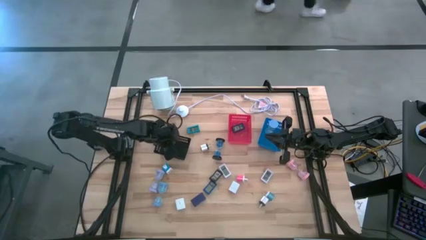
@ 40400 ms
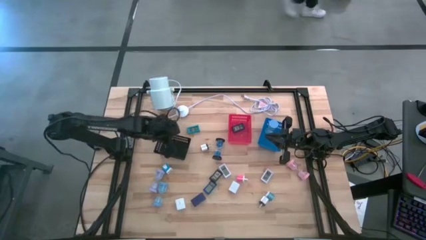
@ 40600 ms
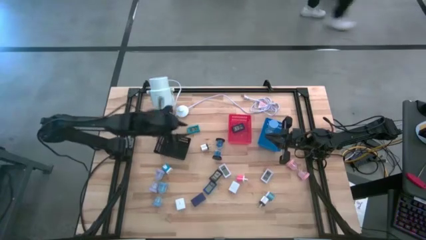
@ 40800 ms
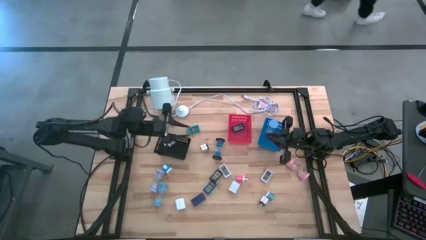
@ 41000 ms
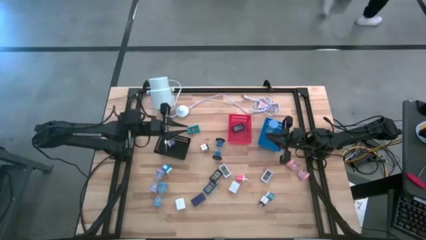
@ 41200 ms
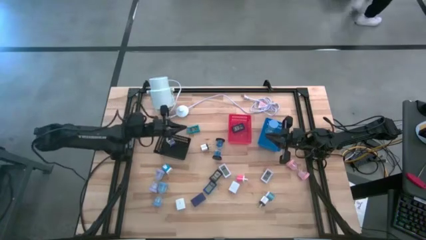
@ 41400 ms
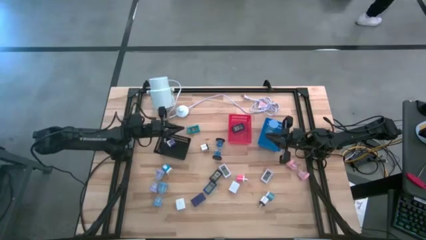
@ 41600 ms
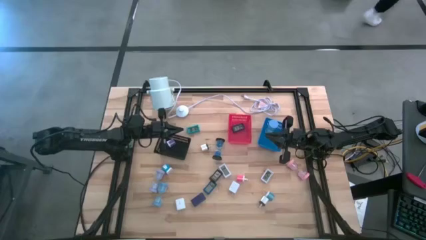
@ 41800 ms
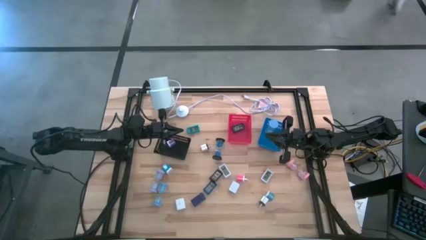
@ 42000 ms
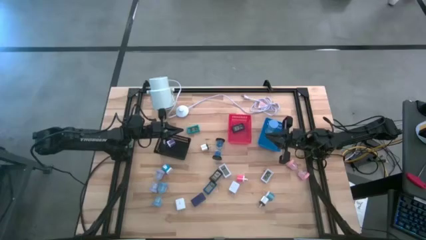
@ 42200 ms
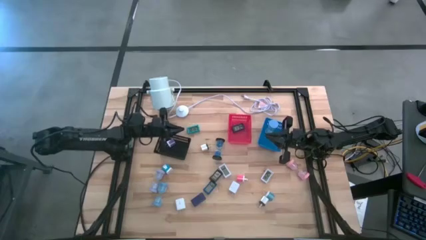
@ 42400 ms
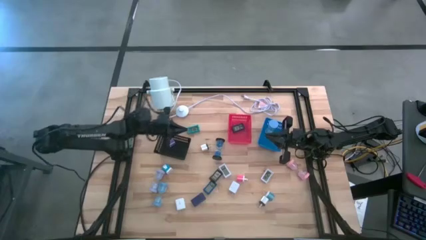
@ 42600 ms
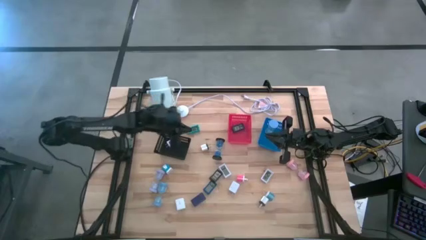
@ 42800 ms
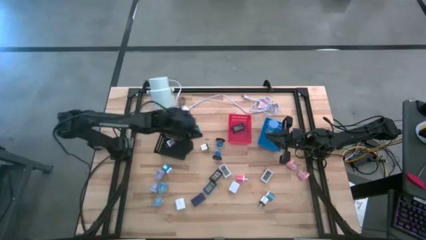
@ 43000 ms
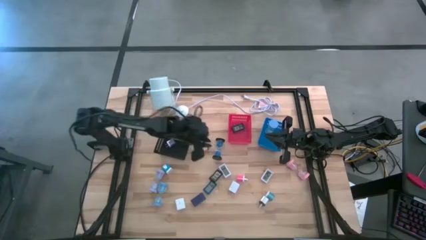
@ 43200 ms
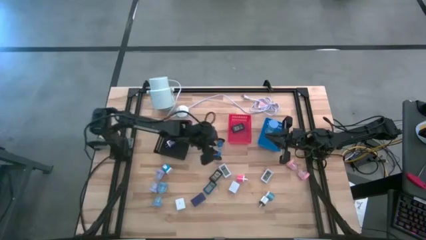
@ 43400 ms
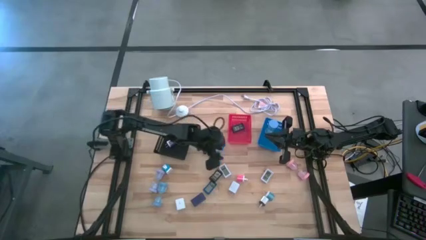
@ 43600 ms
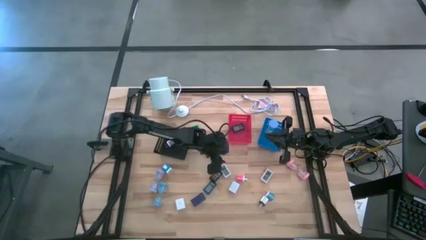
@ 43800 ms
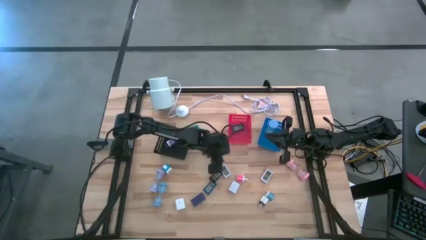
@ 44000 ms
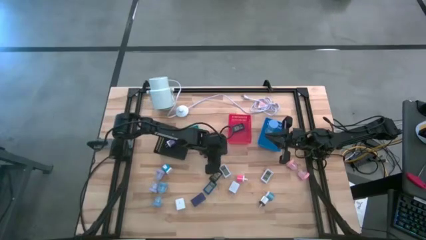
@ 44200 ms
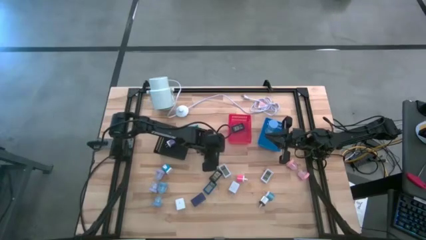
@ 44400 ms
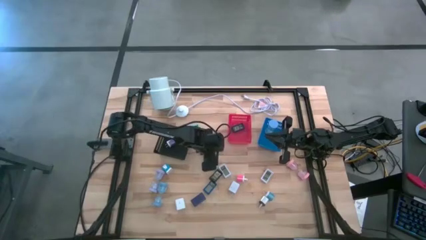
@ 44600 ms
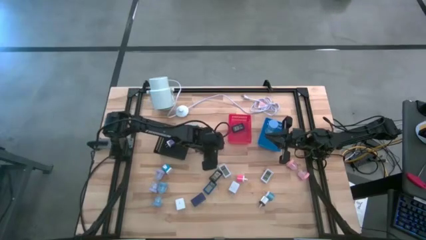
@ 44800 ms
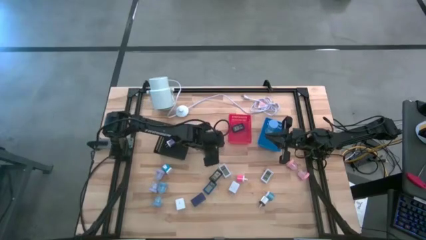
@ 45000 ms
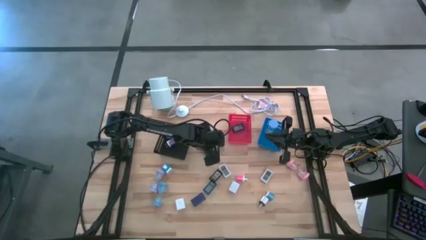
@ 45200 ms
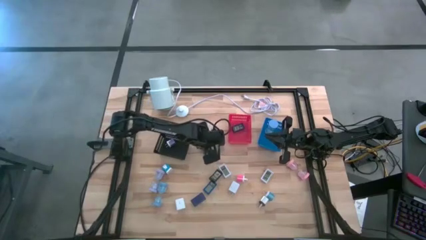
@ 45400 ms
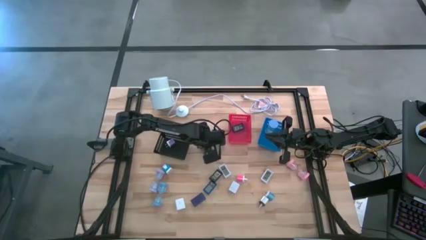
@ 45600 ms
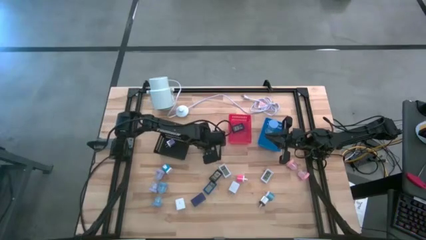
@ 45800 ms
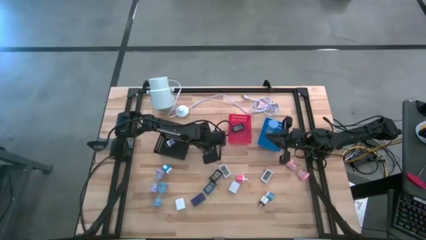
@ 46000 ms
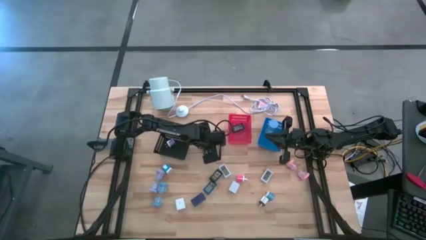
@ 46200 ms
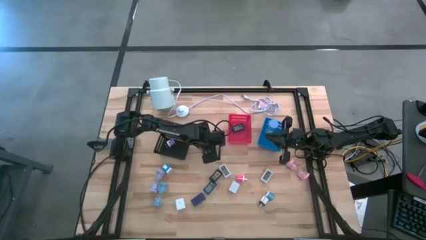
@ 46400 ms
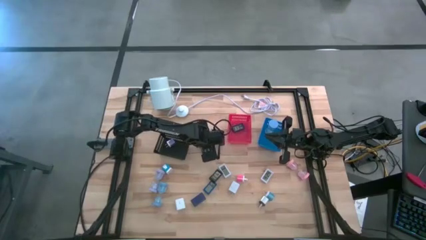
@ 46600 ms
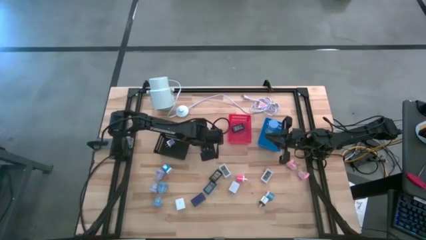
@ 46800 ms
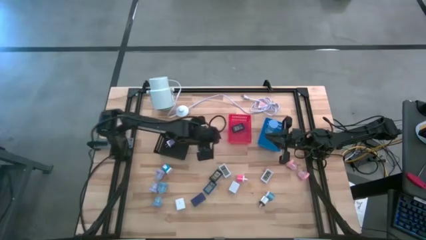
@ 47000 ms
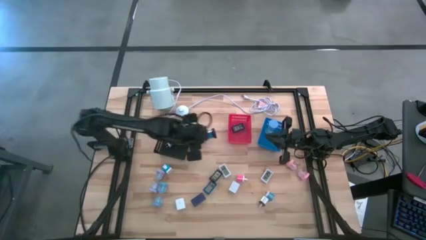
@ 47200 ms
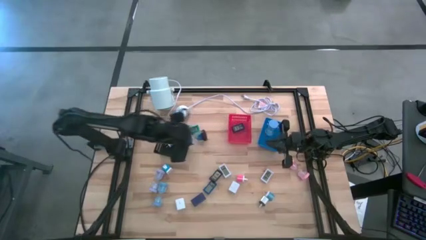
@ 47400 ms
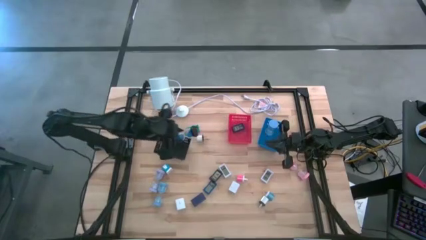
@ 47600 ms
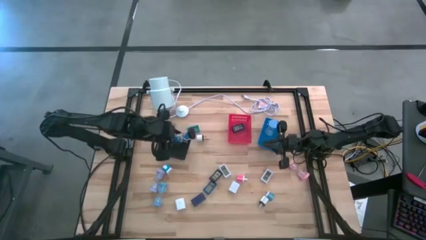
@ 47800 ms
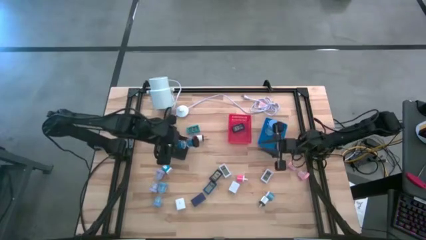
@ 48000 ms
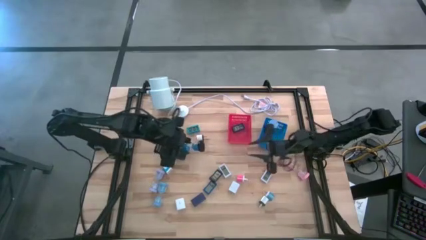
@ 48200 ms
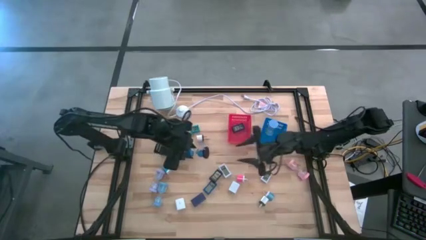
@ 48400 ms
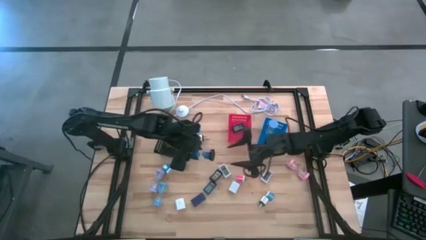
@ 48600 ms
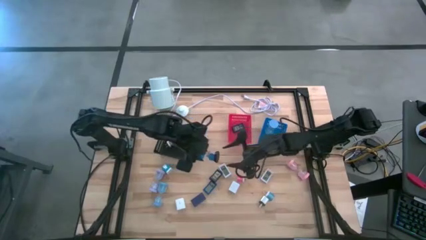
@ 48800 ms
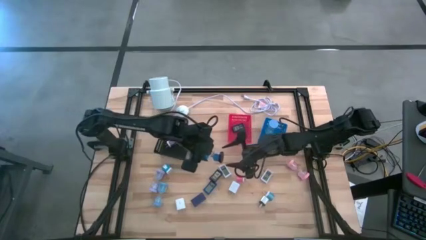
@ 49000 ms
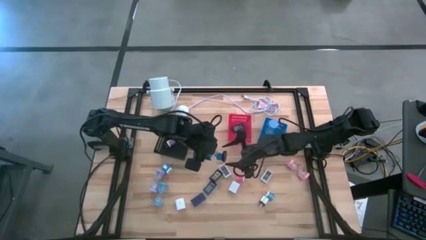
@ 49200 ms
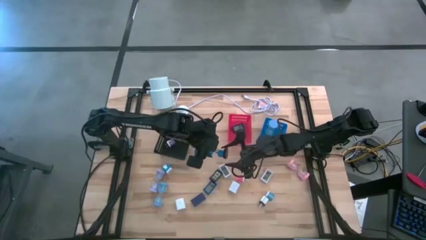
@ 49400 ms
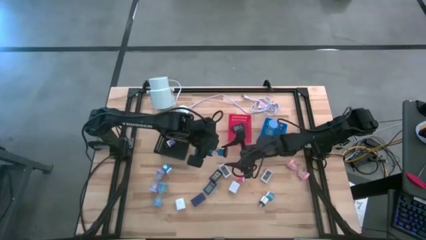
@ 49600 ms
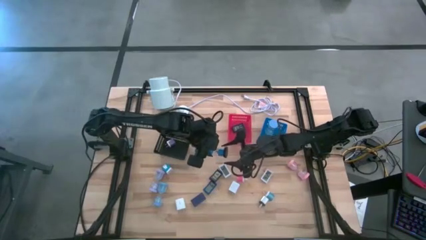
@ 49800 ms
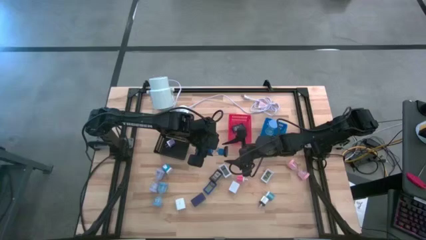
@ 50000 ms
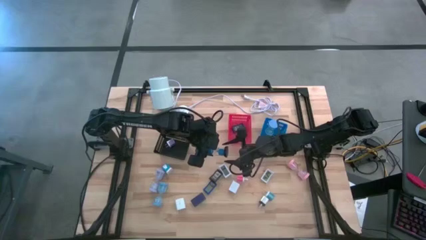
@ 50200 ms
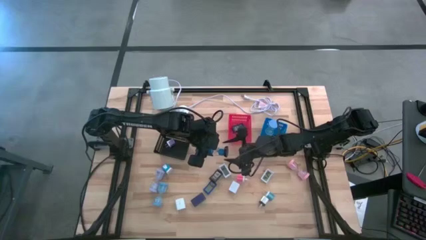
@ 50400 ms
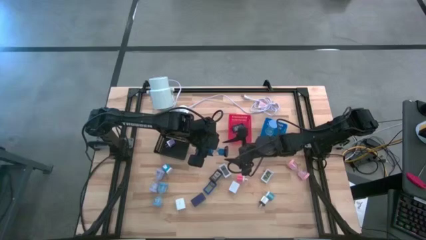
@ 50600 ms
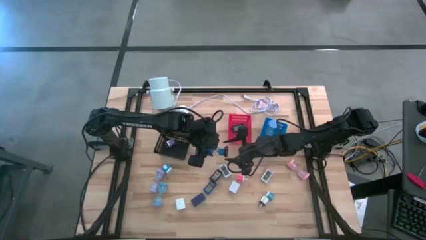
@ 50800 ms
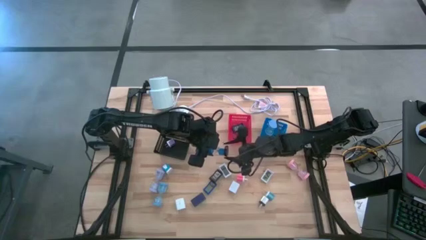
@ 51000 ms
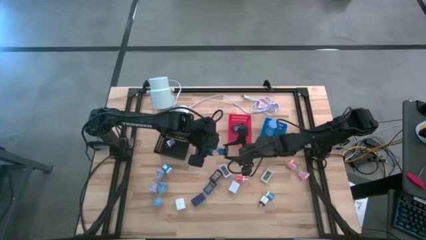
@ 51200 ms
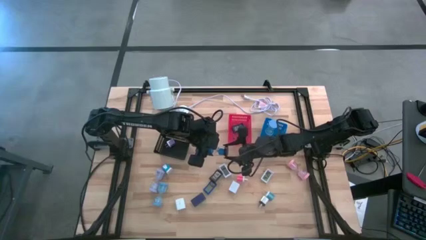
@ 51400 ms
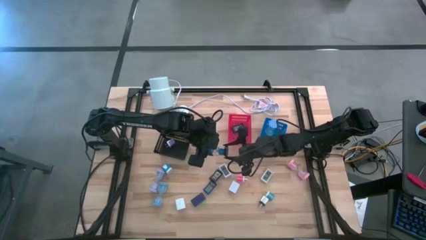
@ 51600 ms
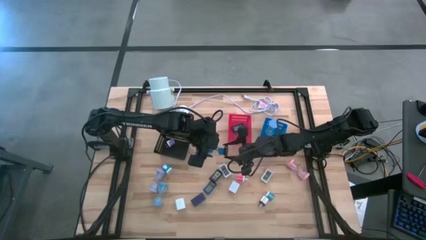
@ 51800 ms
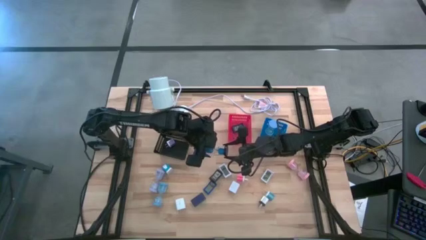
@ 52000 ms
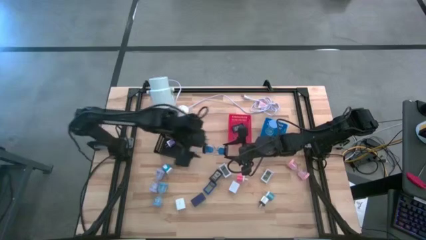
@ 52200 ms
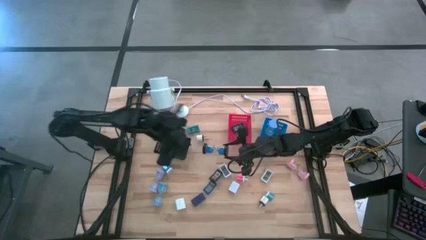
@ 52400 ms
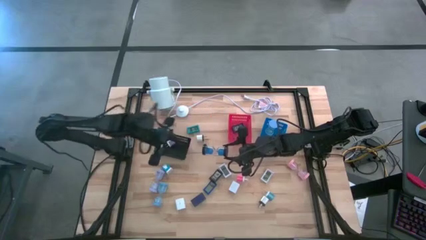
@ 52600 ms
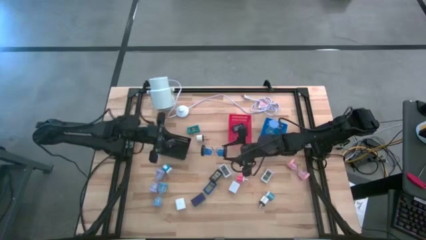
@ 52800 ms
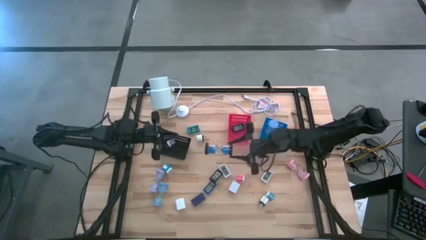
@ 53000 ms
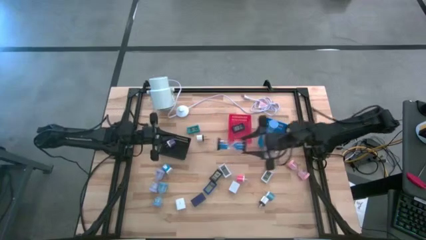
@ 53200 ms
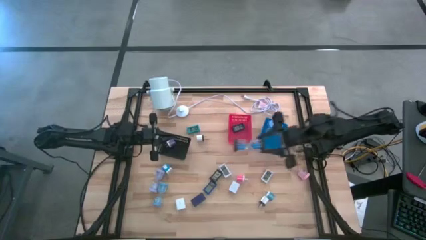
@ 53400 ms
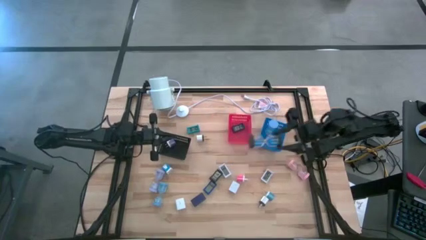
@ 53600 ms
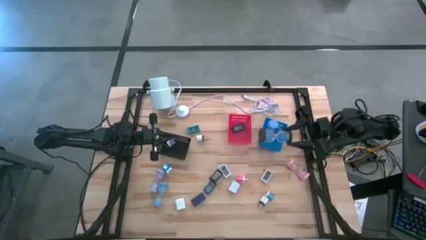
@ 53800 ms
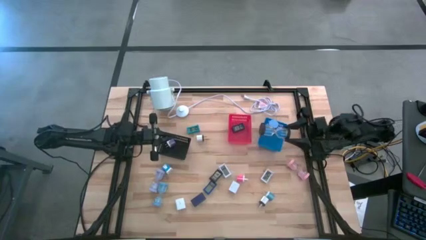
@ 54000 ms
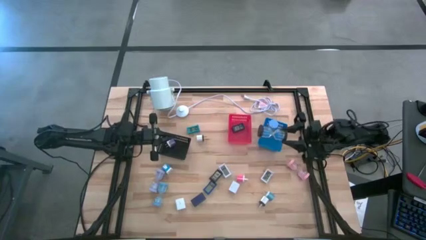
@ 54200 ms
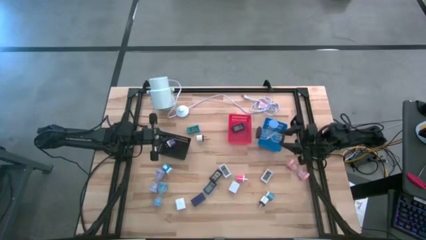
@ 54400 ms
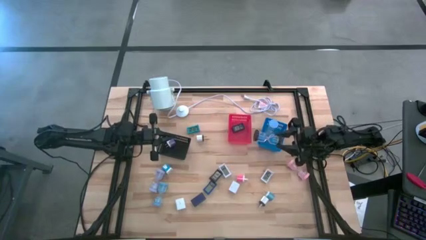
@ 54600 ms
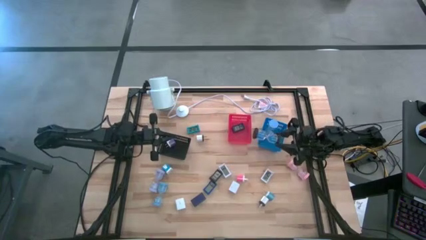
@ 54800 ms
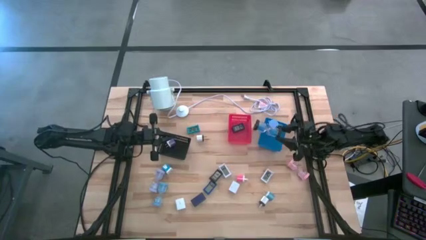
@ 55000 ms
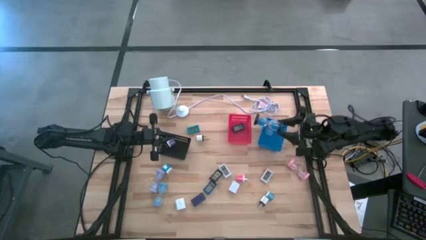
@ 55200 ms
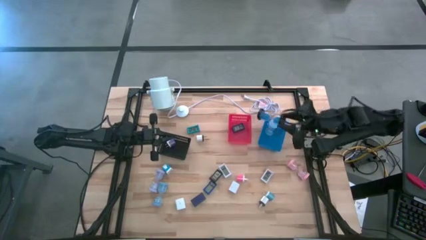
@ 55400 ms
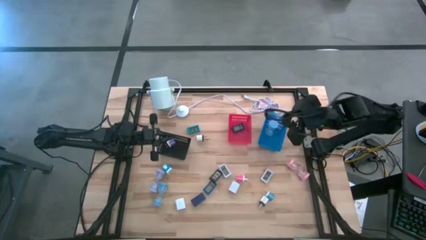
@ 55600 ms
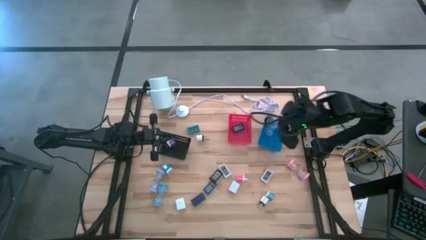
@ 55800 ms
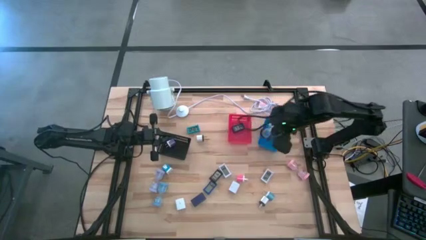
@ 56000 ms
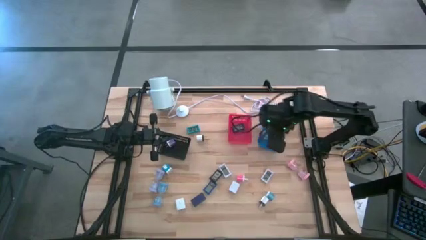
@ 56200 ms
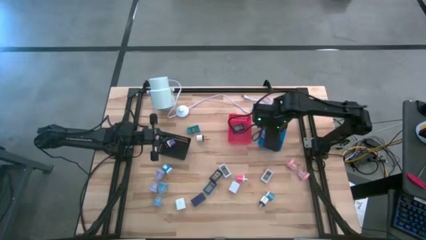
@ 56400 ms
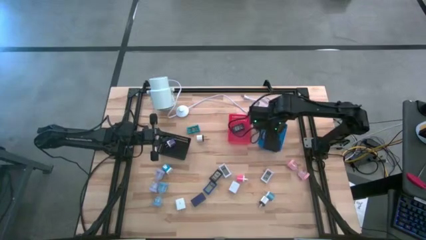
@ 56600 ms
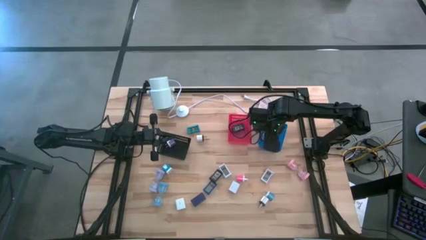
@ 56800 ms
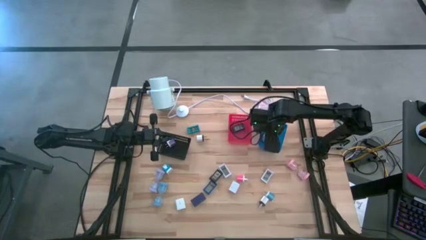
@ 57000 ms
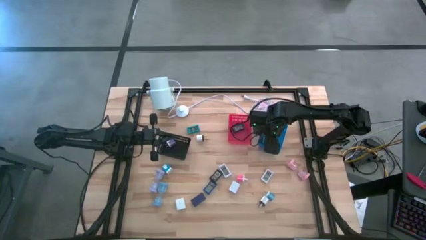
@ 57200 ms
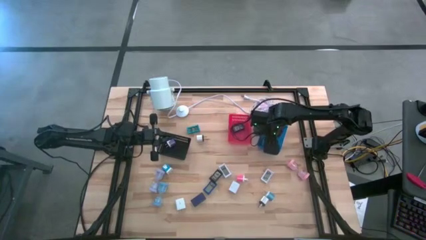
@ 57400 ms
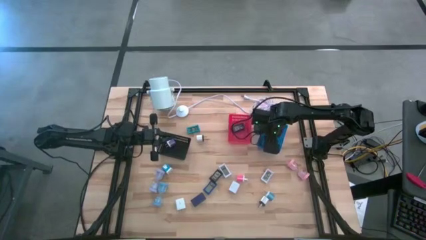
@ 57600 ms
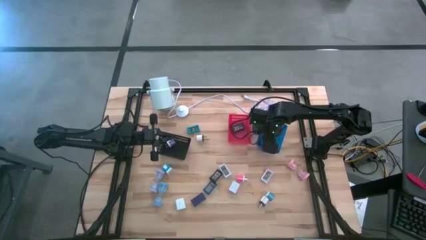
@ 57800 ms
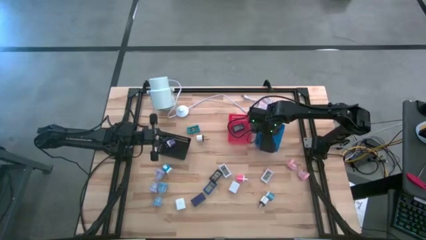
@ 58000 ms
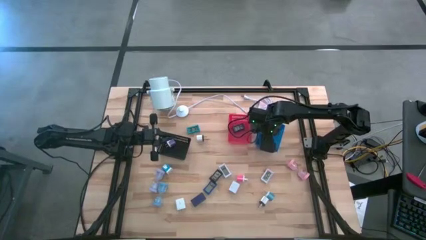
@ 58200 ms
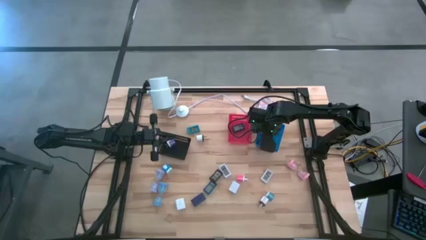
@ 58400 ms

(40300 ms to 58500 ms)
Task: Pick & Place Office items
Put the black hourglass into the blue bin
